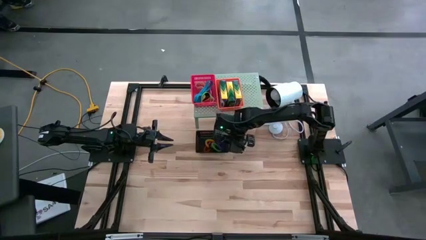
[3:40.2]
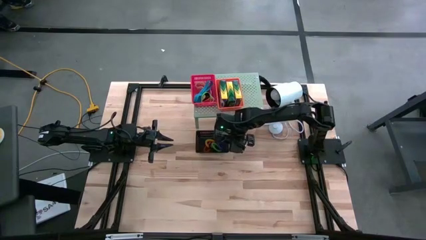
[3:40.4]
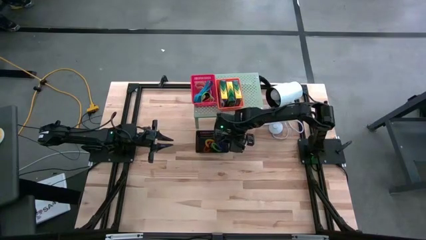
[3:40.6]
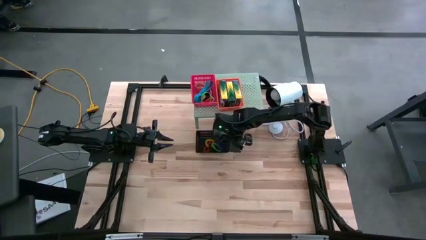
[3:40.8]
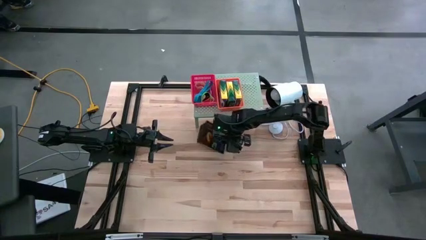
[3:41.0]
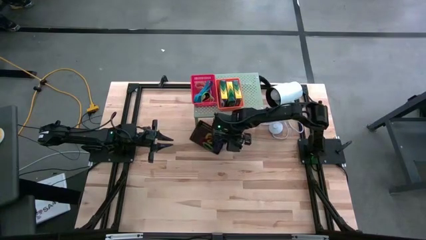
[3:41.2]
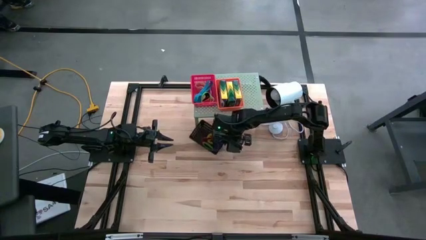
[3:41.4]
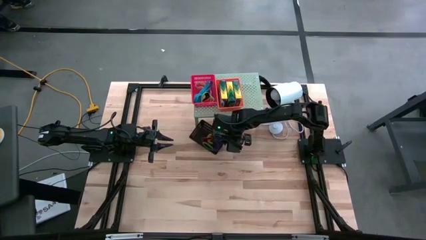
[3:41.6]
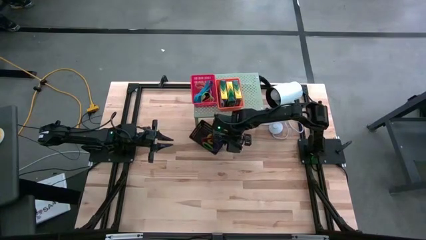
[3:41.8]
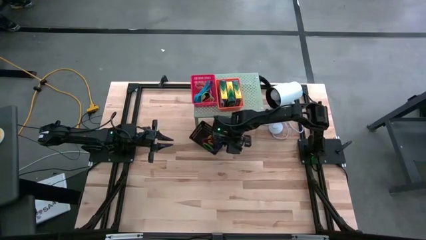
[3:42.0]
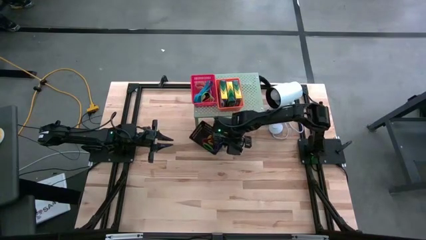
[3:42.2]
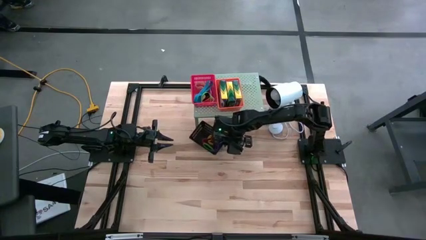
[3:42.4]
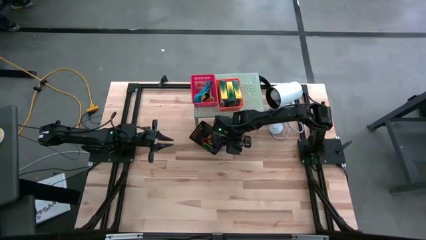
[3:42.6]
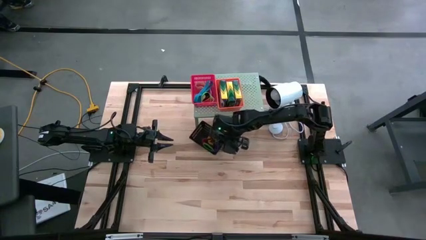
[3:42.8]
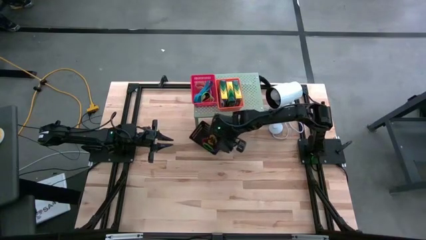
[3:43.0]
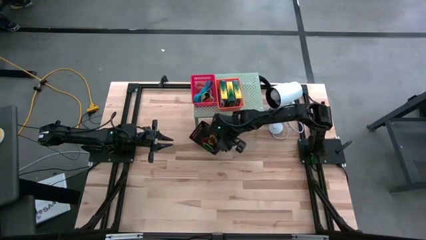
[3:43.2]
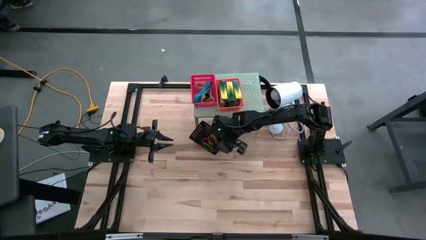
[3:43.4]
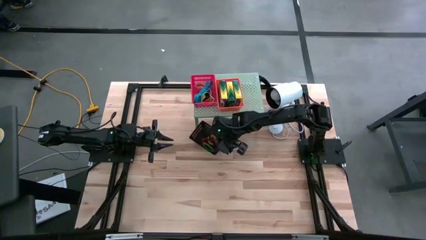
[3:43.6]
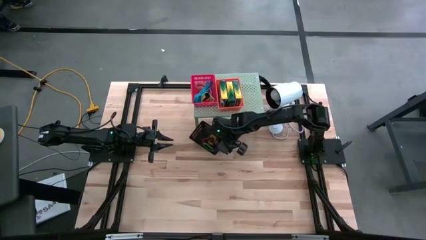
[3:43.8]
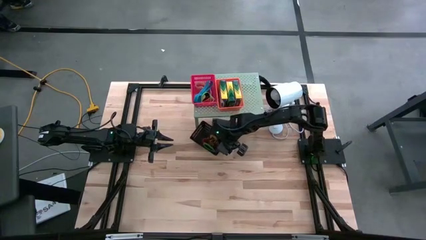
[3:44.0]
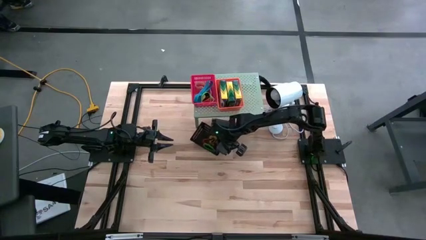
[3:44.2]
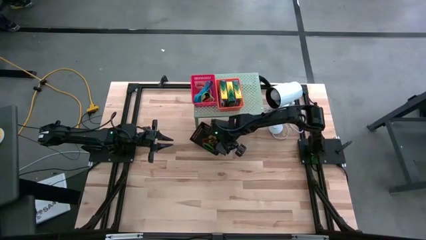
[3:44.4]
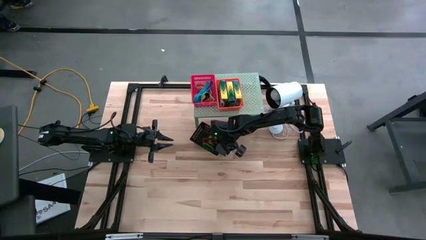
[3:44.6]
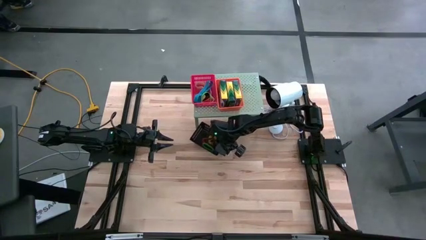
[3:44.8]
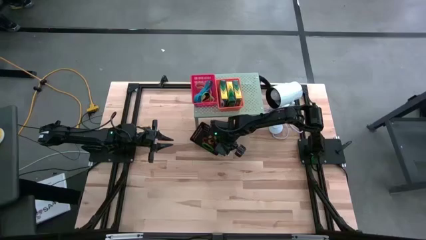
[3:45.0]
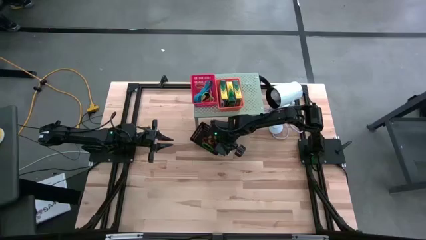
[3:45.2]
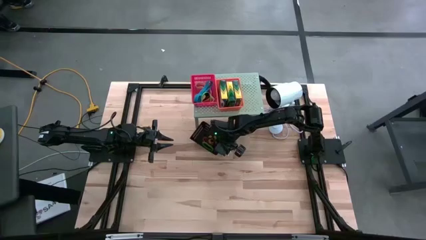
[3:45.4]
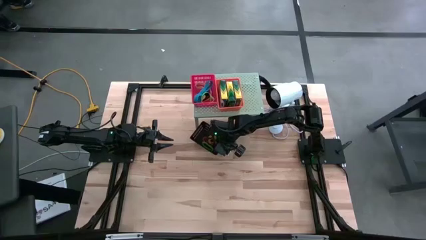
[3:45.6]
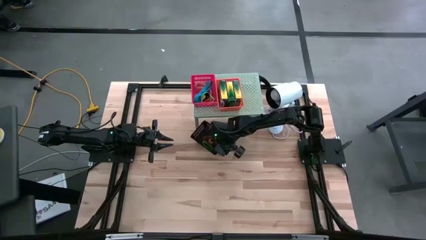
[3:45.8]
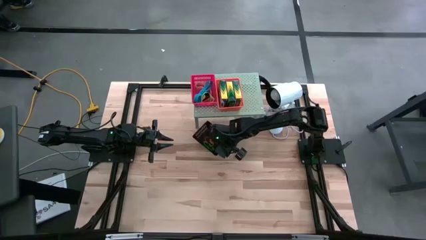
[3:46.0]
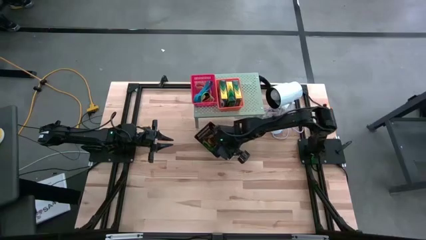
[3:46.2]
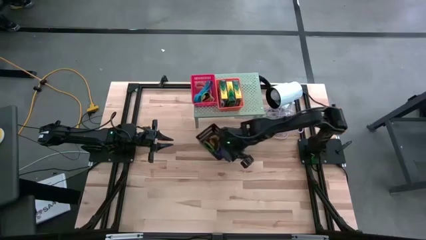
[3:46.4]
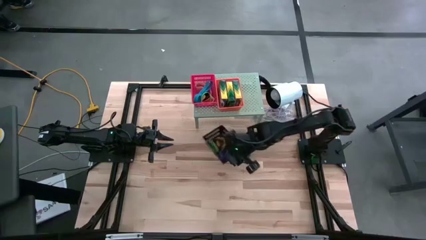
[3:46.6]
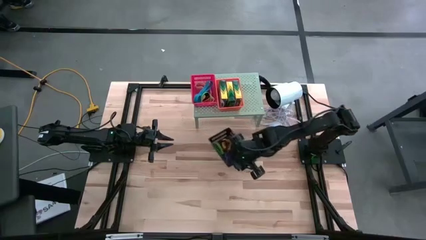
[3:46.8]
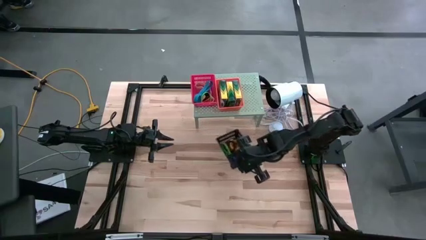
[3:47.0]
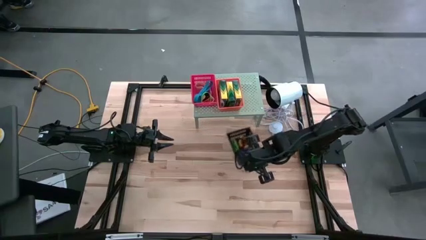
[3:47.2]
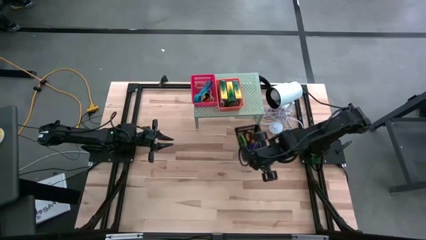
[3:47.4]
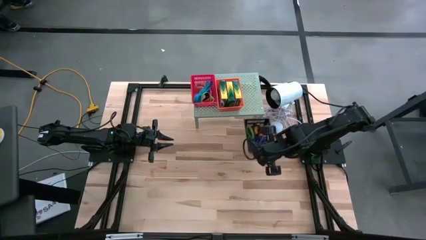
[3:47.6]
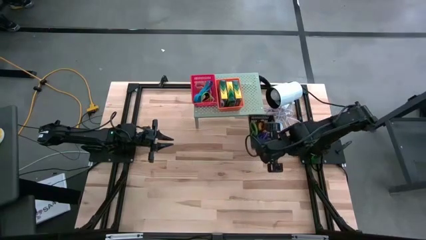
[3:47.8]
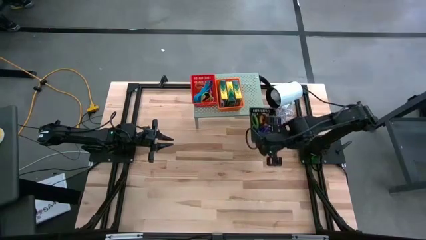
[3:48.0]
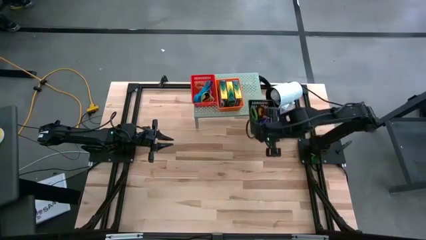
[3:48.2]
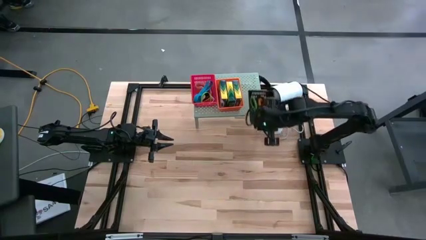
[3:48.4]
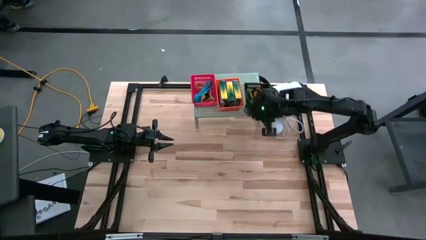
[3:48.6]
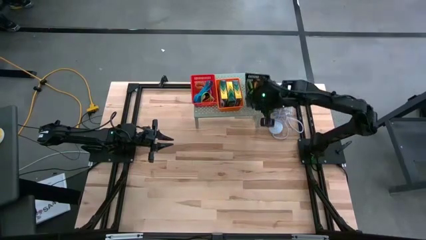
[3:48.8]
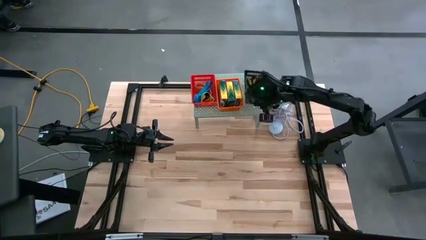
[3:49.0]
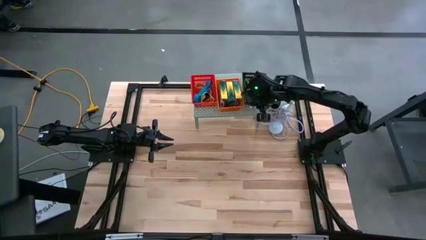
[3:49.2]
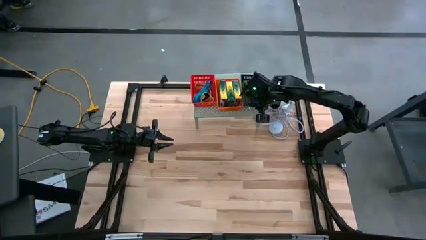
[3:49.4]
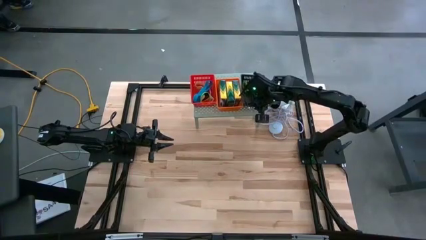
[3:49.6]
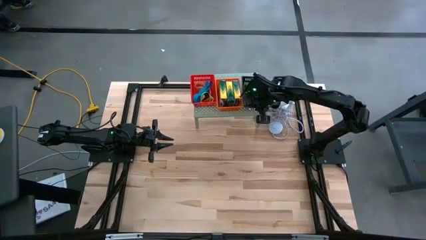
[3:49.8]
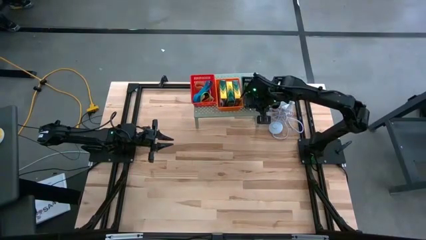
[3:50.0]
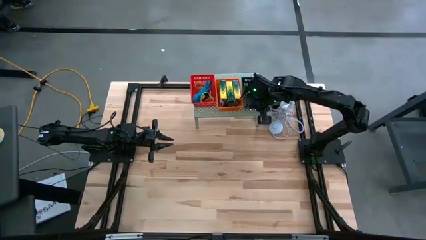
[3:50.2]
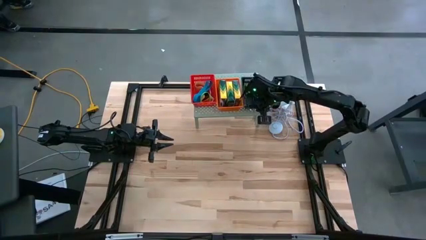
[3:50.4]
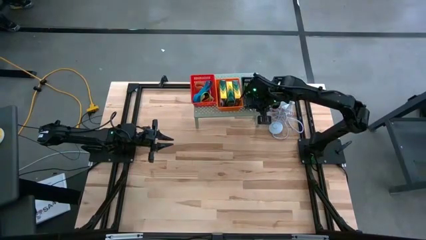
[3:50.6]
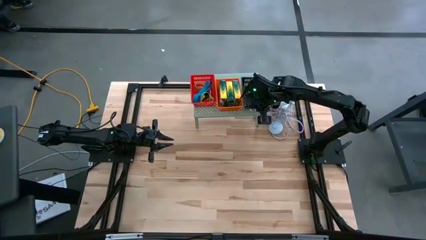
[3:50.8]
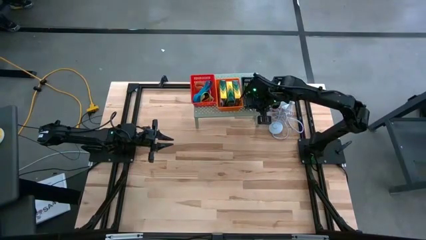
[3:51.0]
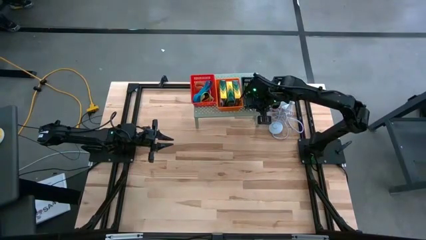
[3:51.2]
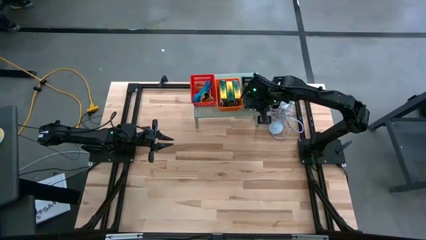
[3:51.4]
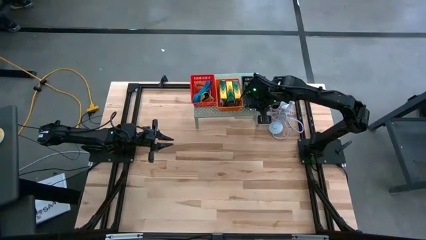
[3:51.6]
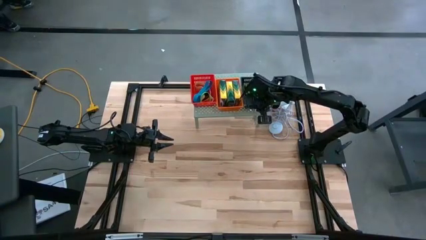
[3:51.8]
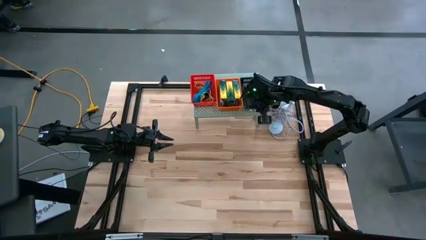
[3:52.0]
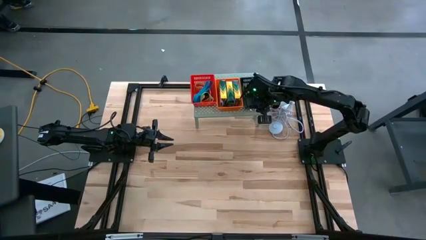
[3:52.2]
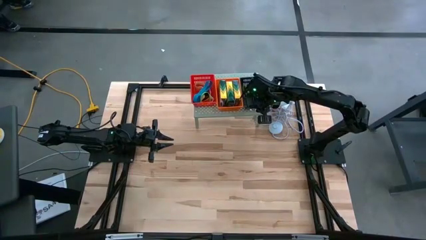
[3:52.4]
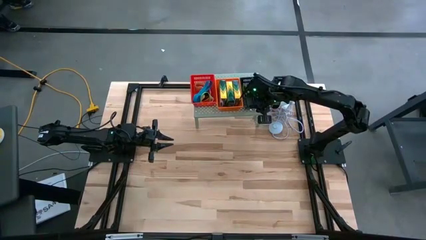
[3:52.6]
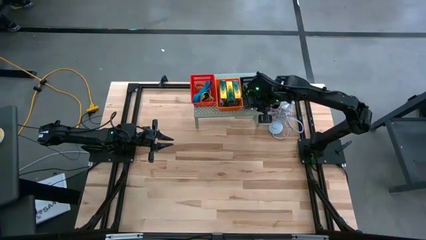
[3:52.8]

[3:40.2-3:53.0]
Task: Pick & Place Office Desk Supplies
Put the black bin with the spring rubber bands on the shelf

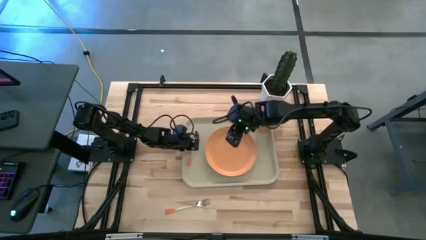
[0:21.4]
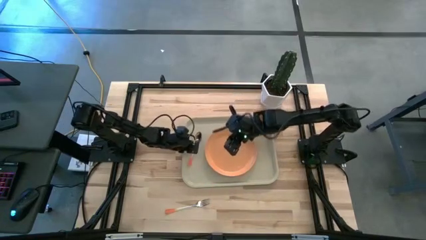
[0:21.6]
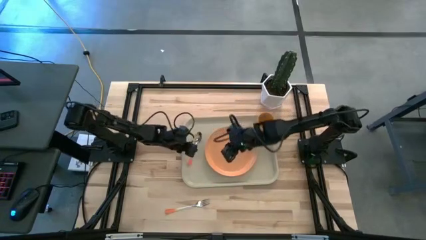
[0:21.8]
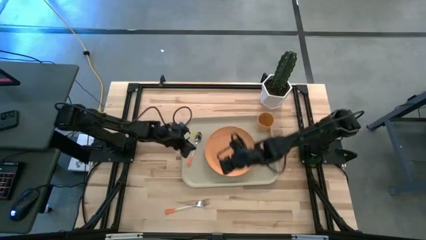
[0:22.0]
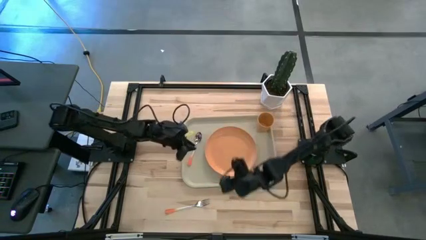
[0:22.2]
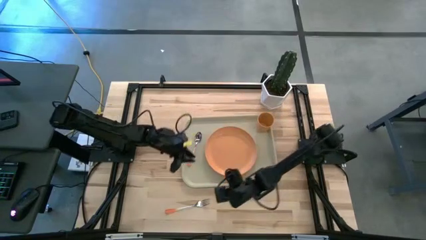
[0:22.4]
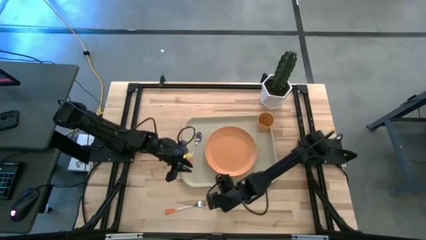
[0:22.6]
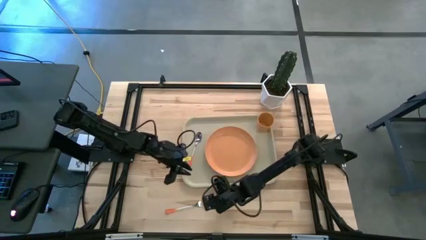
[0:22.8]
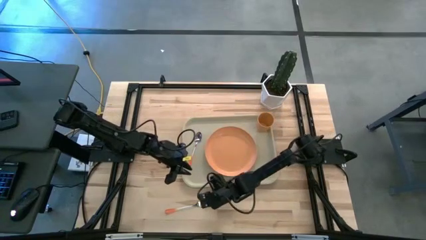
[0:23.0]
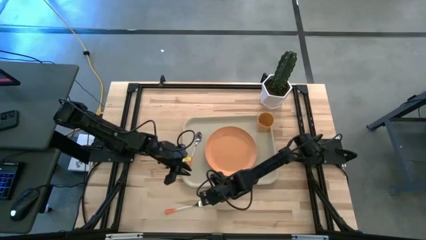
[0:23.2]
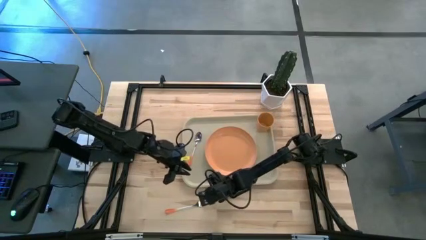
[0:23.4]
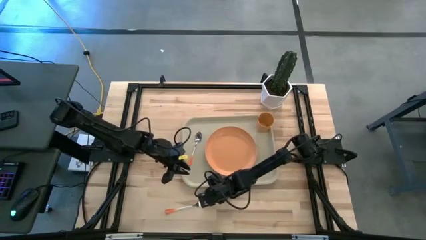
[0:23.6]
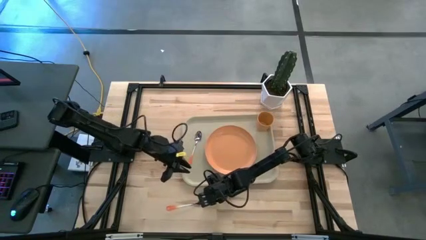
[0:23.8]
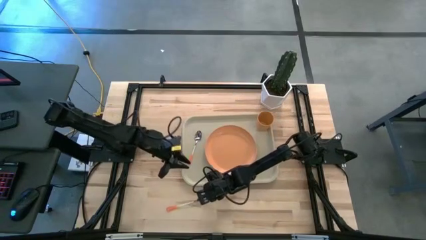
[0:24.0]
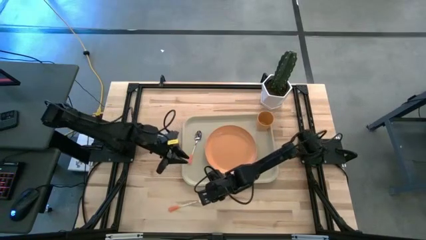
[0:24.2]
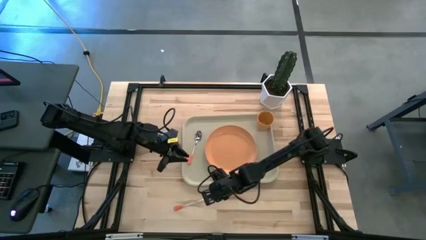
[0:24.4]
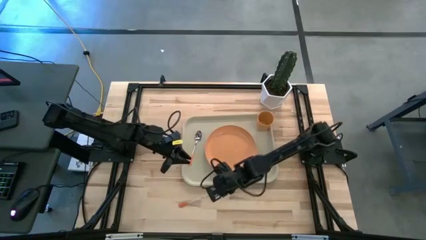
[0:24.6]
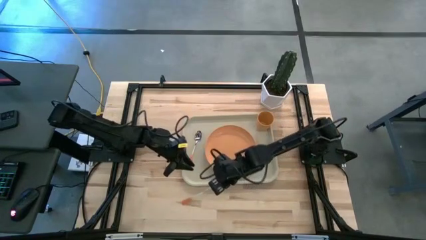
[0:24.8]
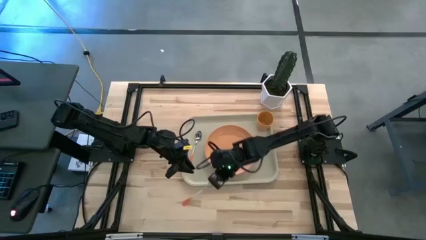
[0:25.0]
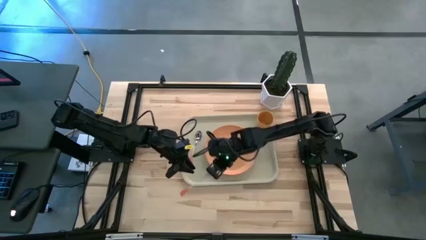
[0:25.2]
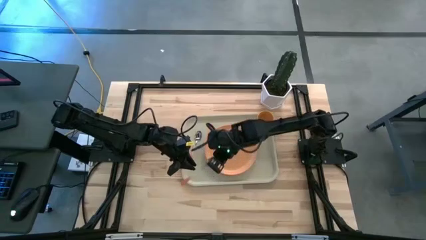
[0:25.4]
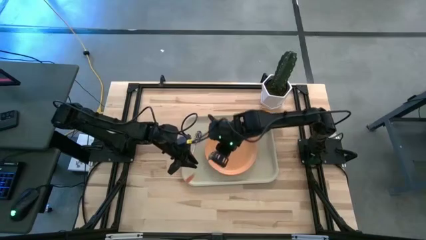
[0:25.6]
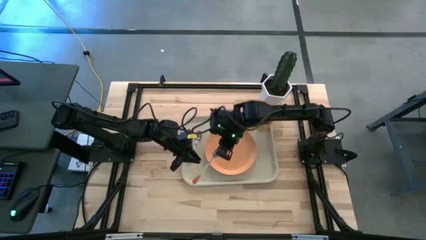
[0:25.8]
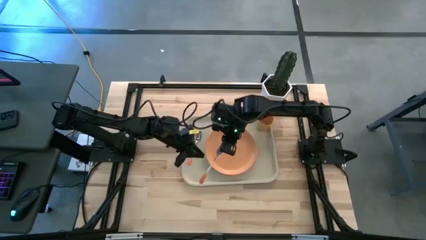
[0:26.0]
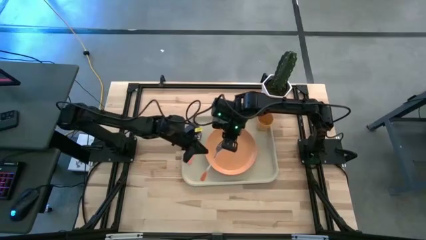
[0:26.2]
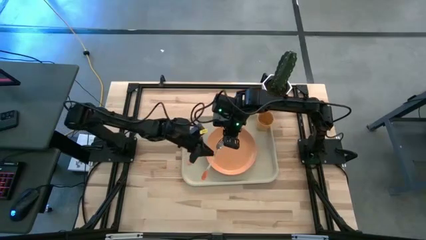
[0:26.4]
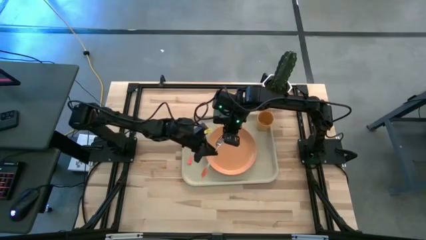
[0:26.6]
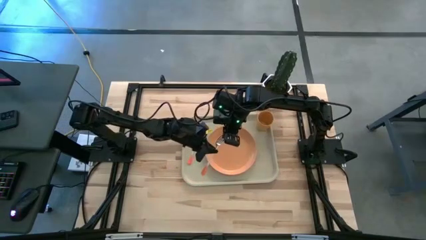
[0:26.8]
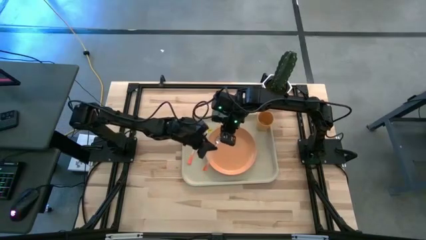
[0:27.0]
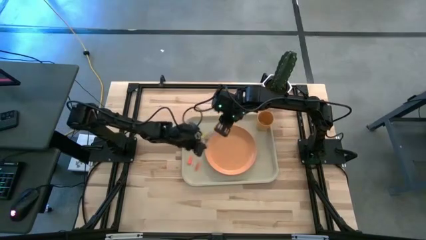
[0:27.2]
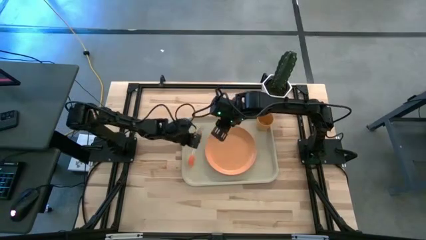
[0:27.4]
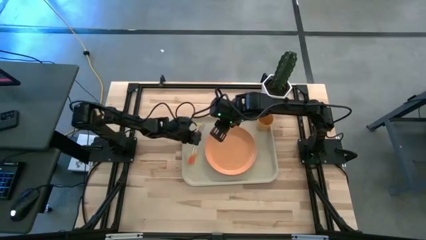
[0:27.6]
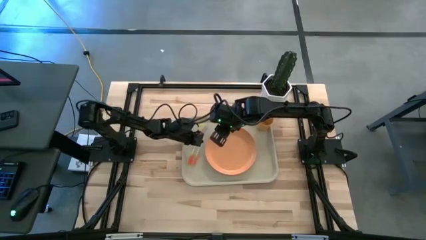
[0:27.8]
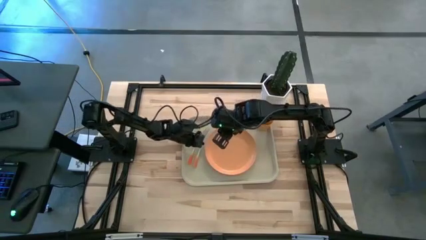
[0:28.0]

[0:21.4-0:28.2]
Task: Pick and place plate/cup/fork/spoon on tray
Put the orange fork on the brown serving tray to the left of the orange plate
